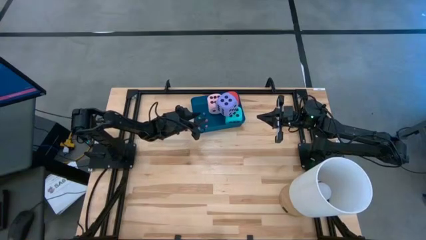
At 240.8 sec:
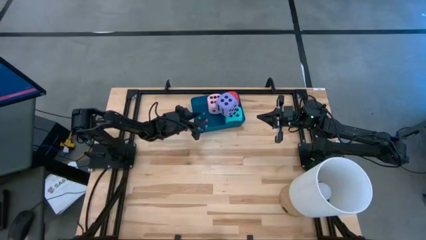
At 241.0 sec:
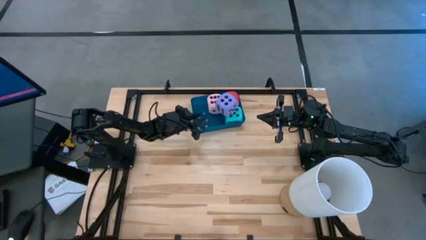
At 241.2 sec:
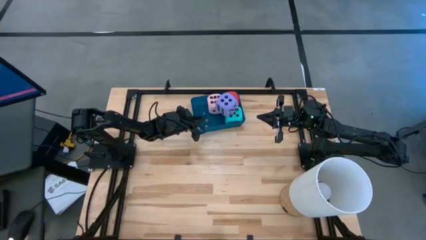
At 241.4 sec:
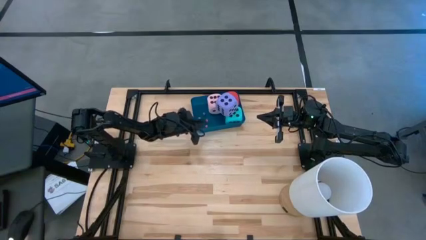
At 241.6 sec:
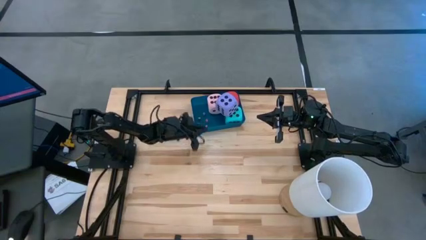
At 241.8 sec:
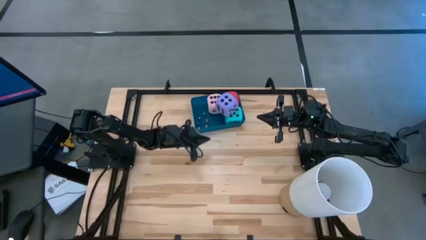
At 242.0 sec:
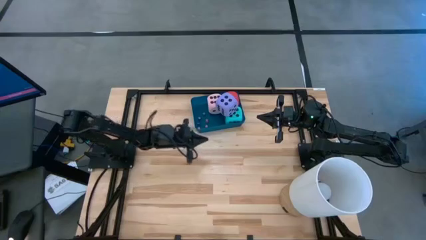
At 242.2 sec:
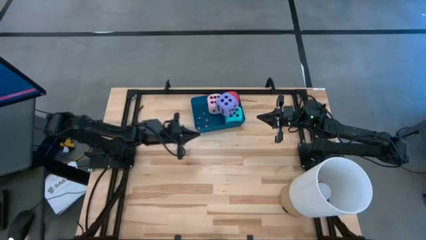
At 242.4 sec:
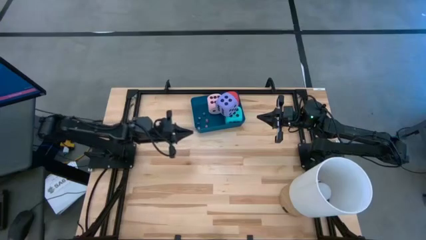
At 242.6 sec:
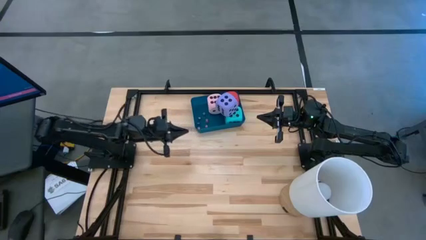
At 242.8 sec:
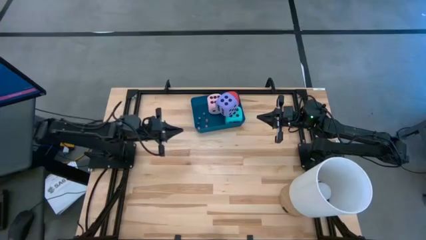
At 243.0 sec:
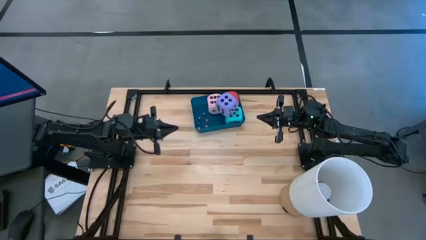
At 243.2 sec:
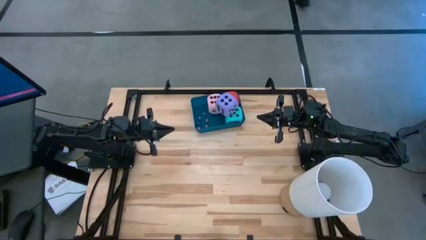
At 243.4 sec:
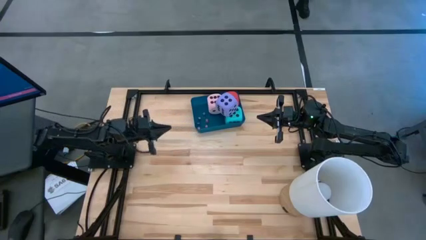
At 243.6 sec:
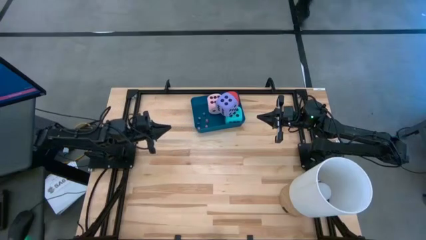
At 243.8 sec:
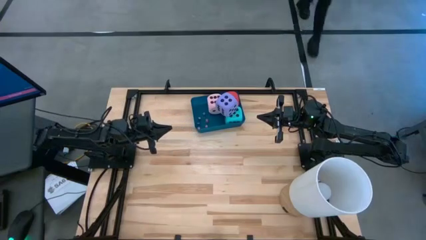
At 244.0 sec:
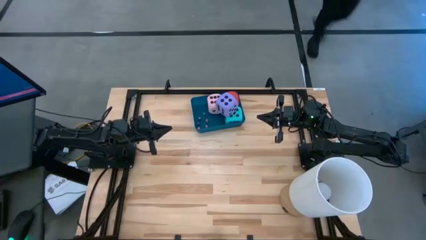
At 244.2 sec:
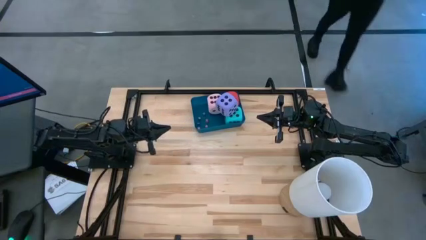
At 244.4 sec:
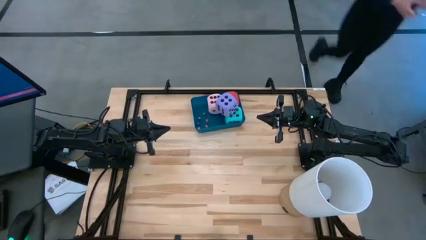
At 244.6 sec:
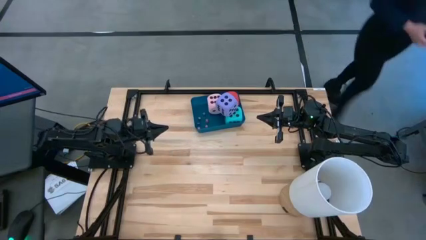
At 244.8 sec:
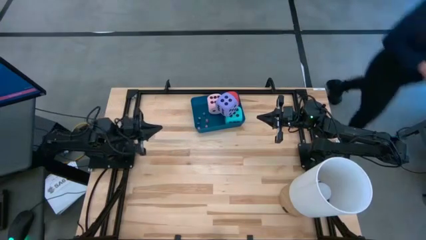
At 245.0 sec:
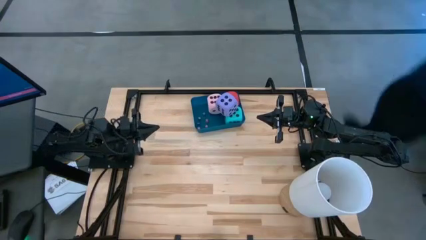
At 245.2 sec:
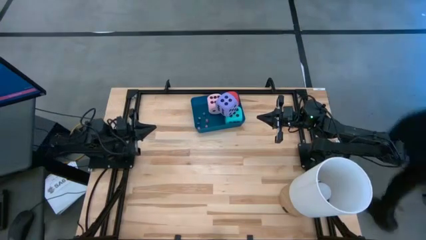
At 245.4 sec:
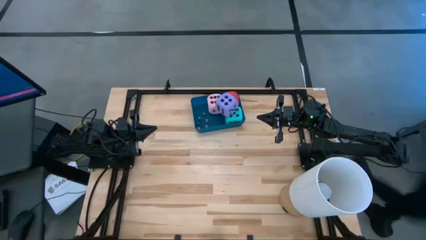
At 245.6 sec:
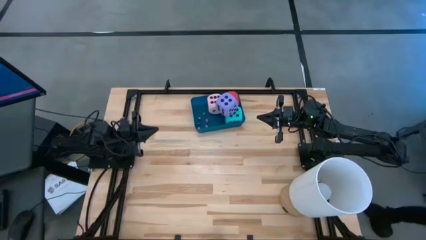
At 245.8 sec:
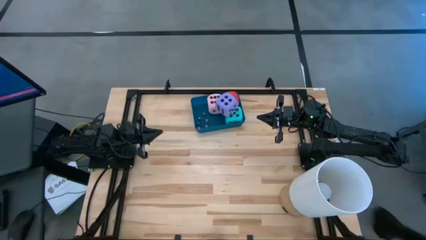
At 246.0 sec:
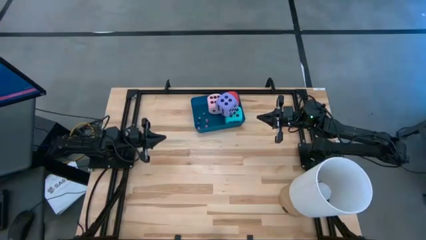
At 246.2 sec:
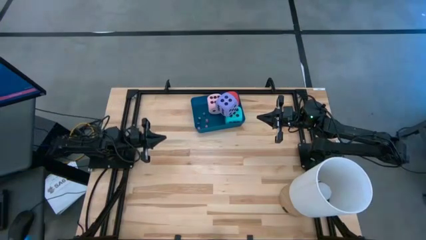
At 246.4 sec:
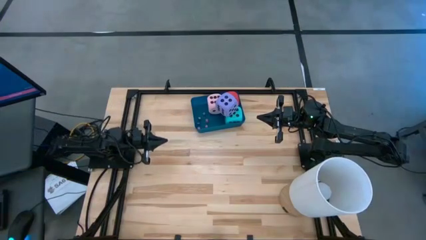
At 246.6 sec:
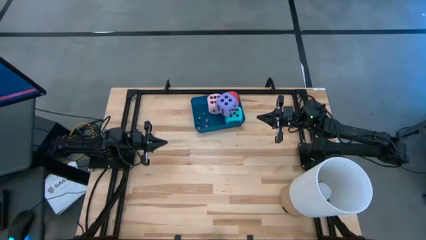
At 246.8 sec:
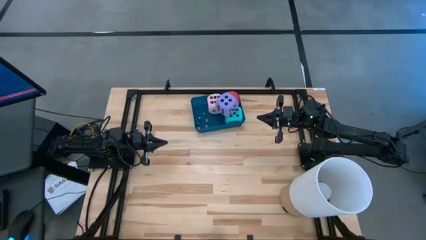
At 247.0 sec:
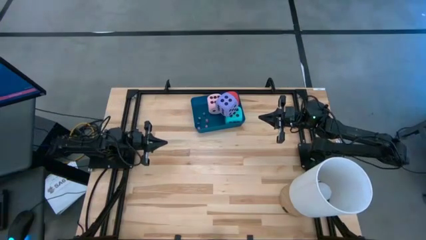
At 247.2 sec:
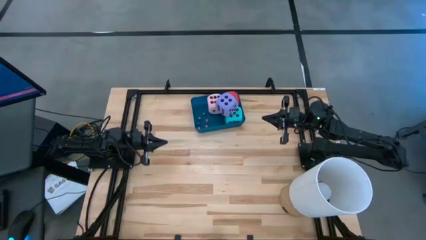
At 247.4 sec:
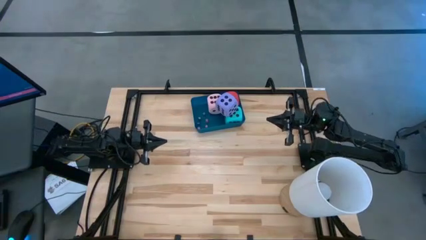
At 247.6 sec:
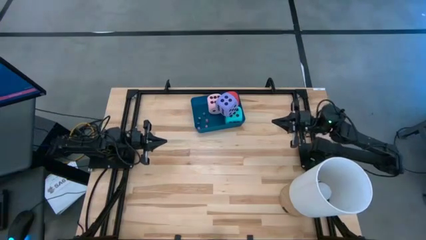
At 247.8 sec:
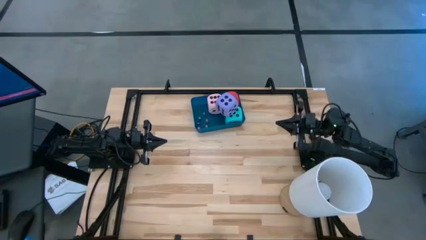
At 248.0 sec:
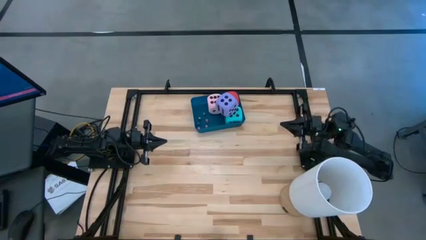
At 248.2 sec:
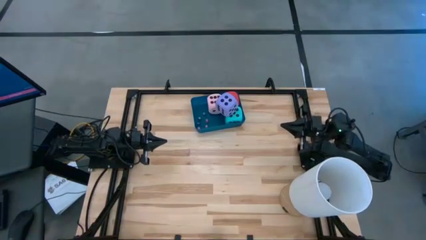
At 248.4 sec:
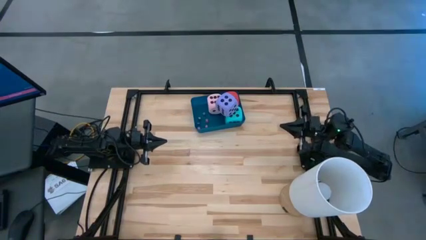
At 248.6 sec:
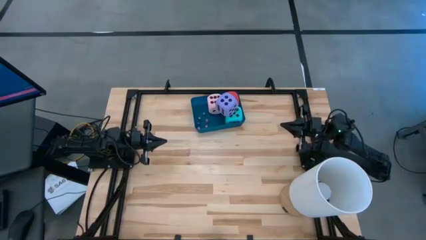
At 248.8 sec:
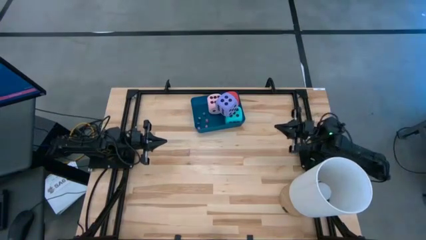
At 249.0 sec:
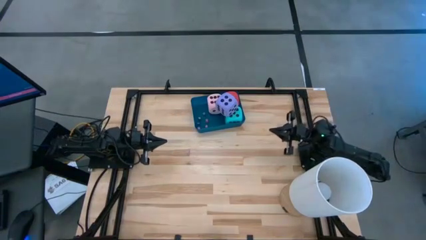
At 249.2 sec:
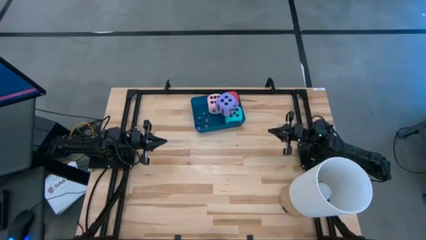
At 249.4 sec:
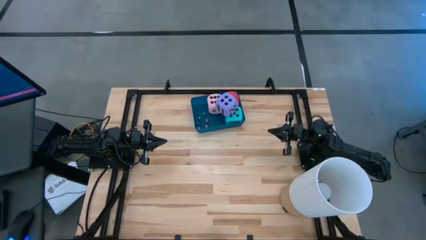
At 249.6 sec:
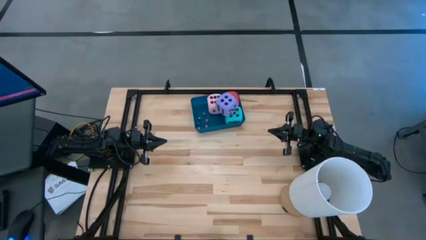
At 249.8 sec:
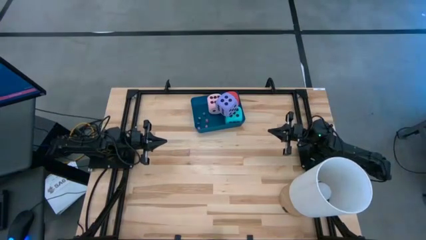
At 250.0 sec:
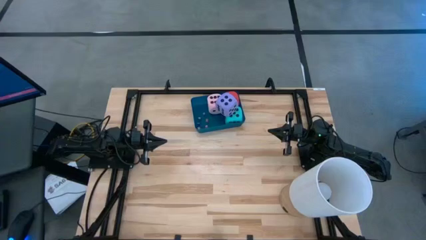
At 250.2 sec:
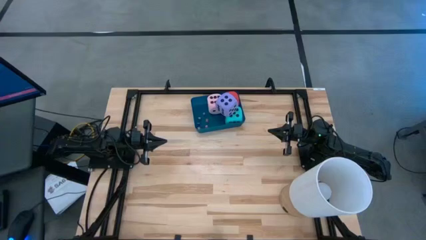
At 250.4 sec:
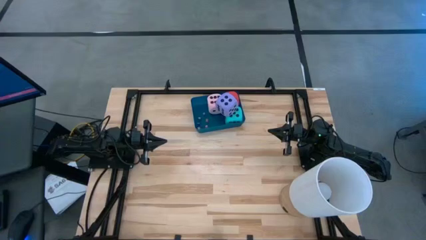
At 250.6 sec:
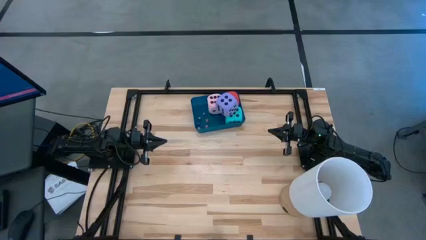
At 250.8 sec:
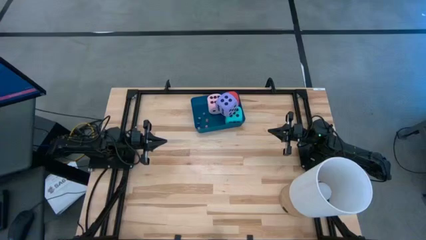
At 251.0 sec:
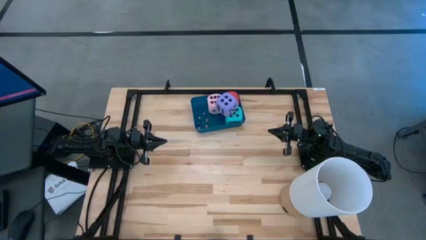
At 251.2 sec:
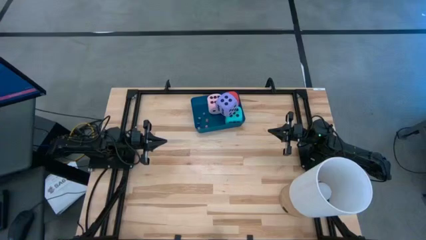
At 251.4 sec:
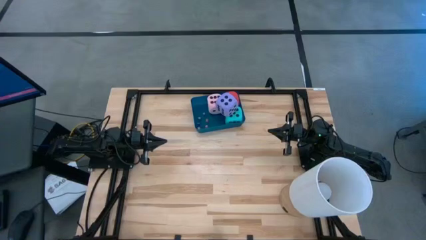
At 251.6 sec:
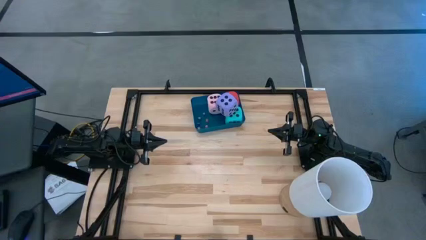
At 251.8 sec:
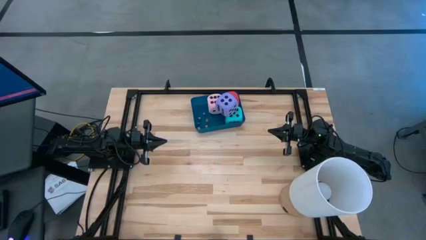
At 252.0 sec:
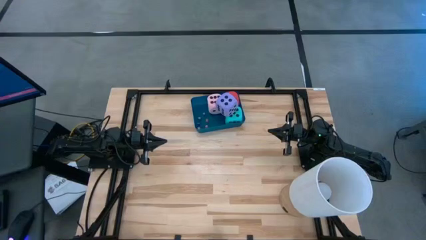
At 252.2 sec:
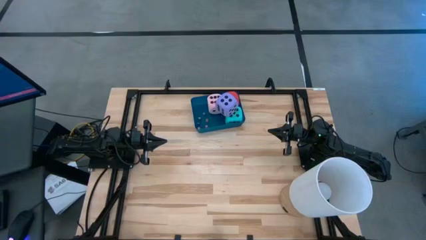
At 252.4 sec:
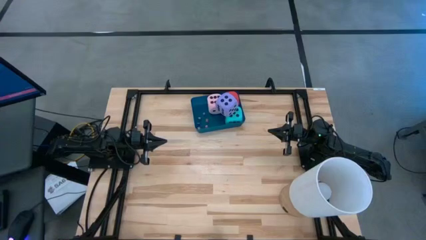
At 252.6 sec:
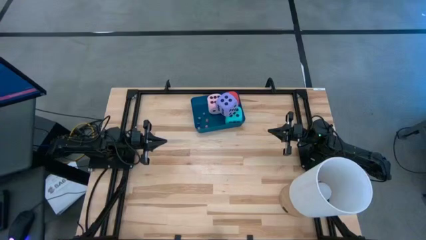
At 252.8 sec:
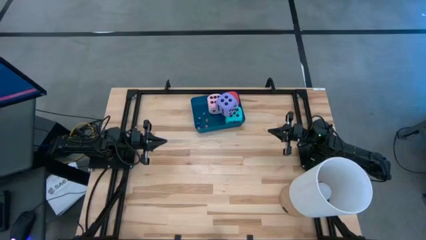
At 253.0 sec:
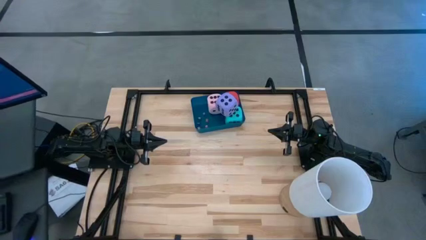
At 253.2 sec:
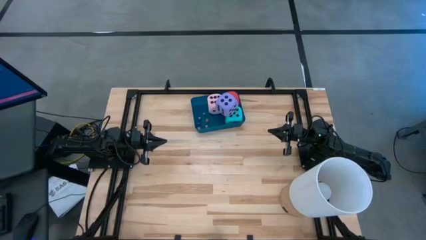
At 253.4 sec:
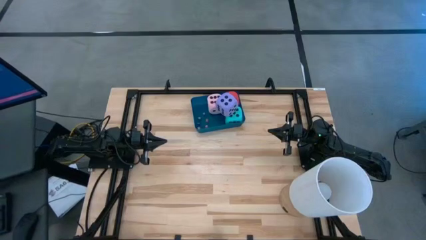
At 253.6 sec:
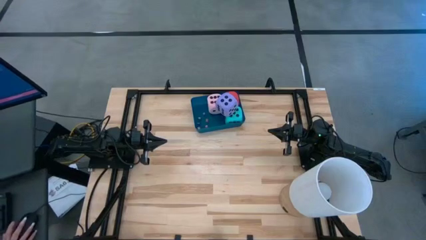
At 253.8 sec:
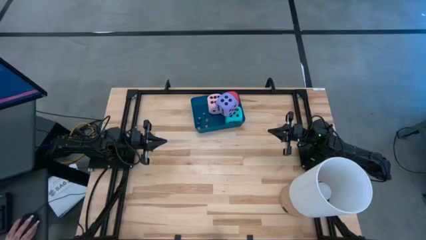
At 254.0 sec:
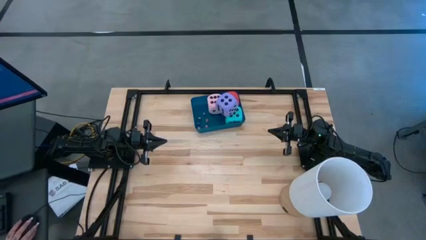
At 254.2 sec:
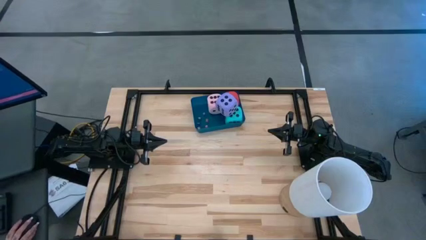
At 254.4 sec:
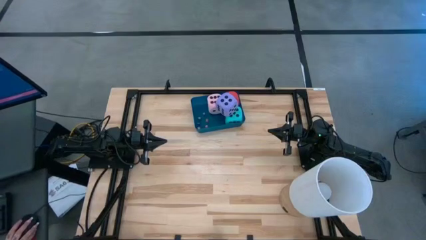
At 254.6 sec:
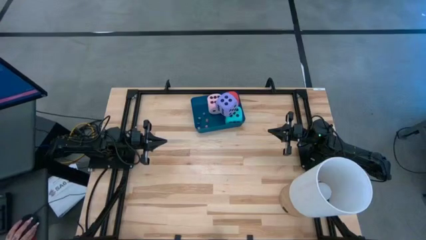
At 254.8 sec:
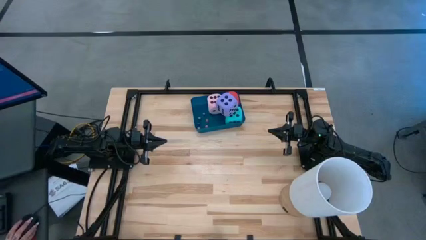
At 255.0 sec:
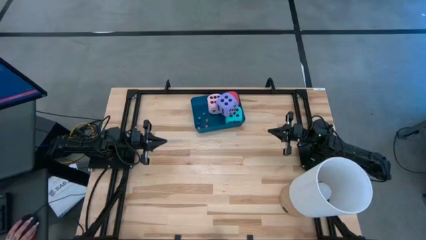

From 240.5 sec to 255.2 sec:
Task: Pick & Place Dice
Return to Home Position
